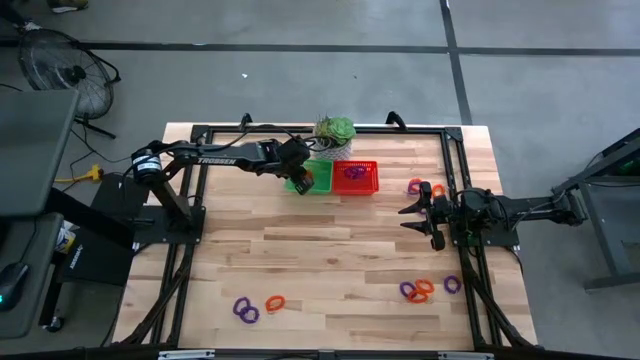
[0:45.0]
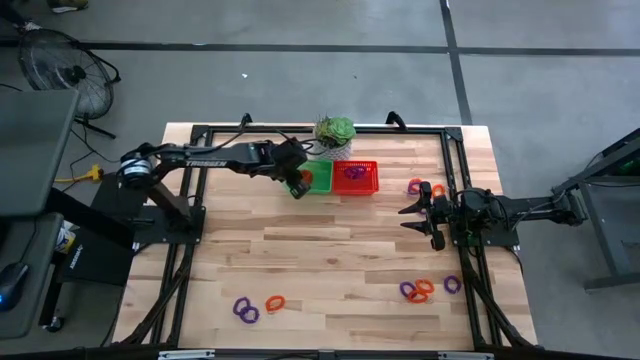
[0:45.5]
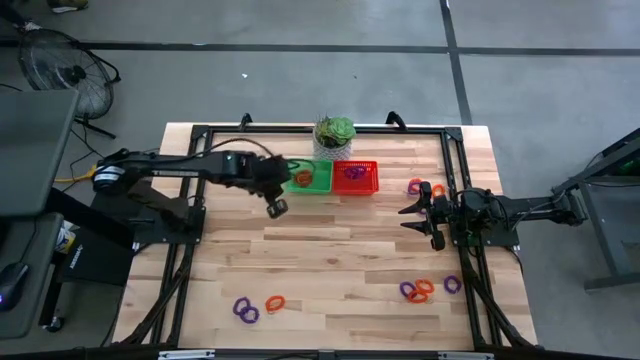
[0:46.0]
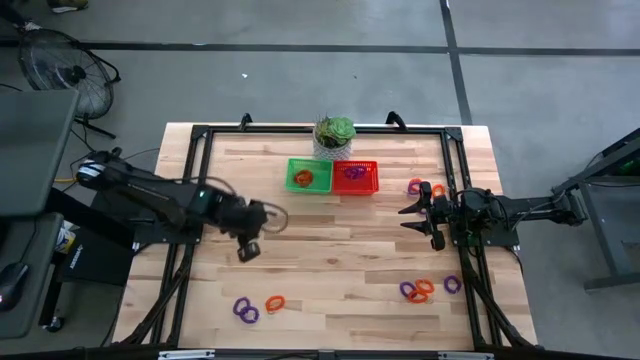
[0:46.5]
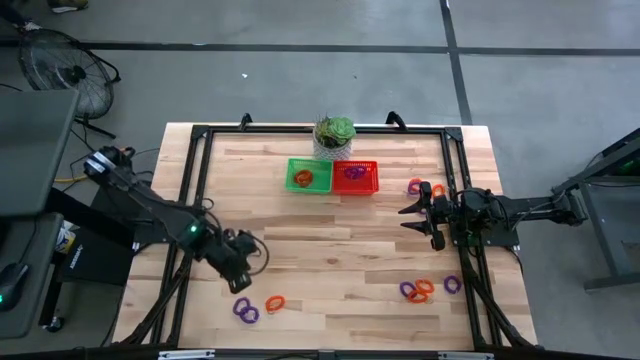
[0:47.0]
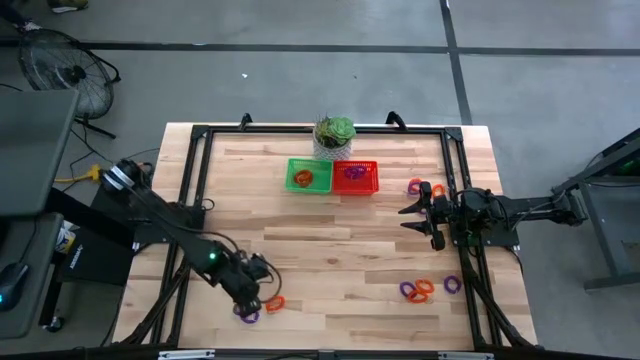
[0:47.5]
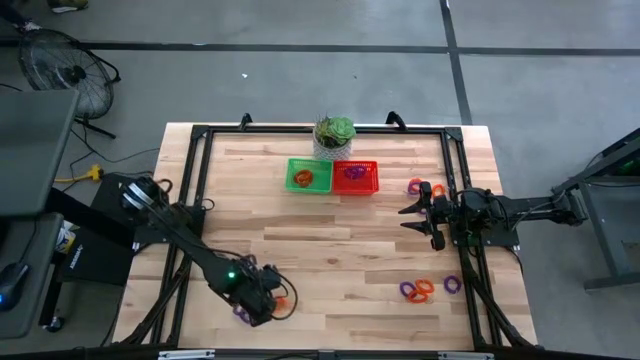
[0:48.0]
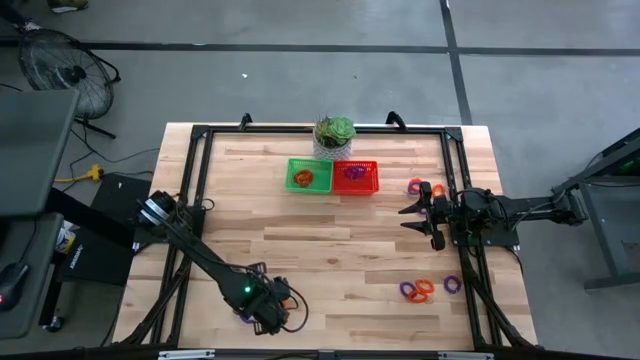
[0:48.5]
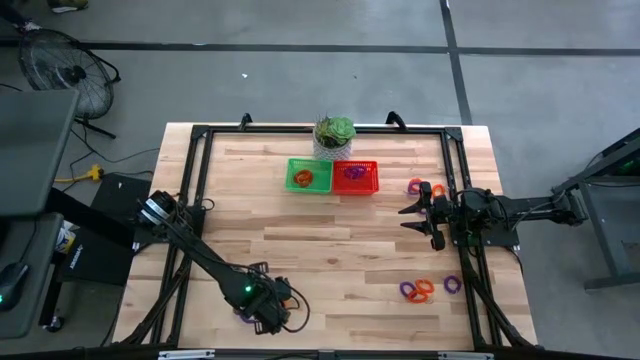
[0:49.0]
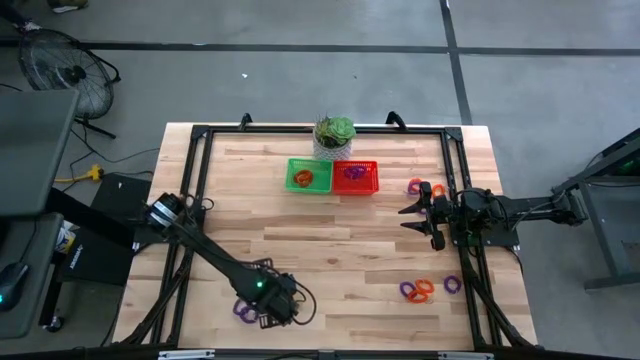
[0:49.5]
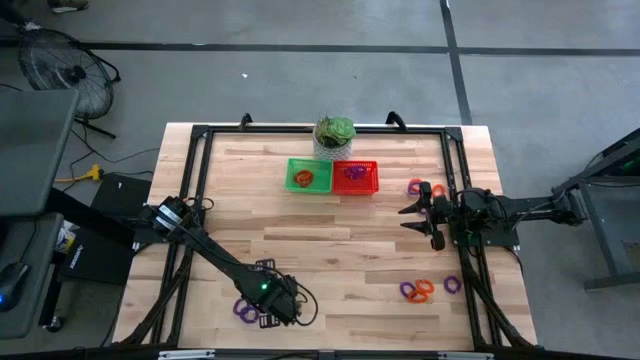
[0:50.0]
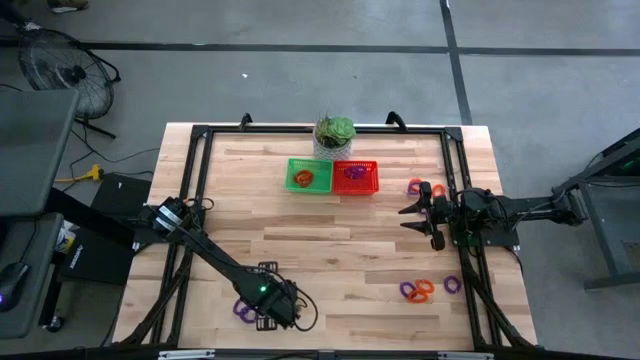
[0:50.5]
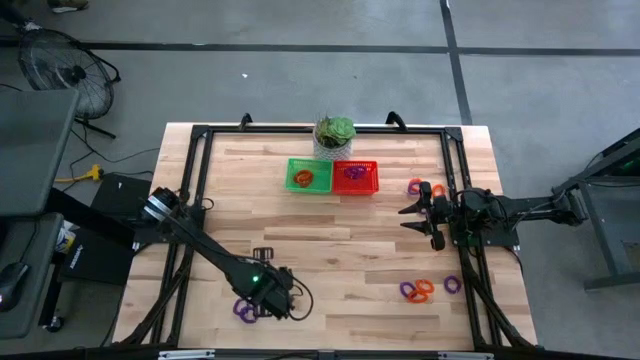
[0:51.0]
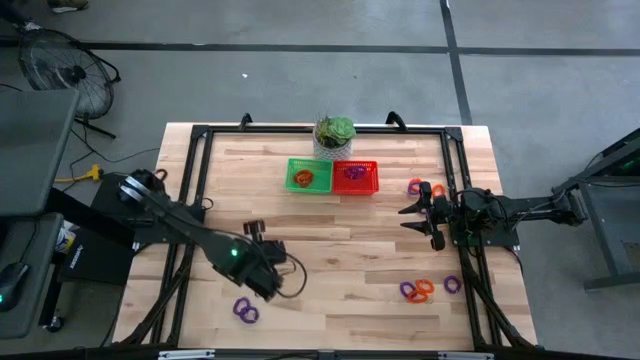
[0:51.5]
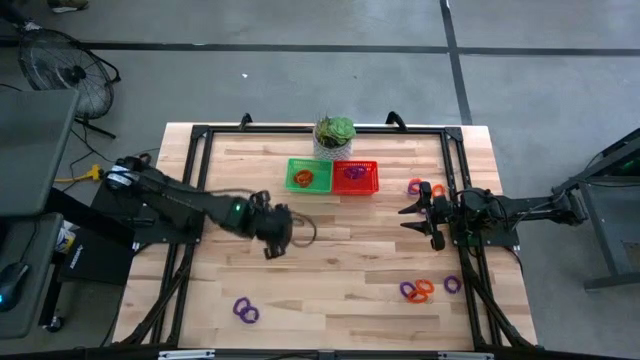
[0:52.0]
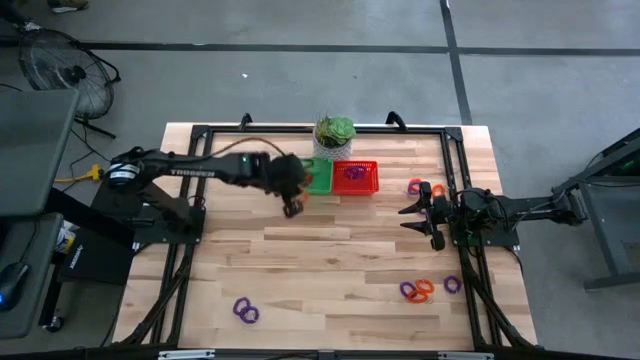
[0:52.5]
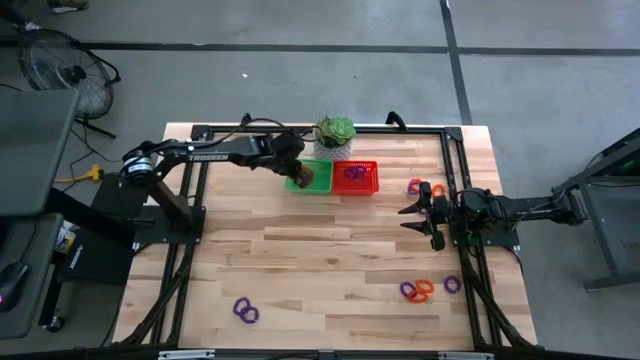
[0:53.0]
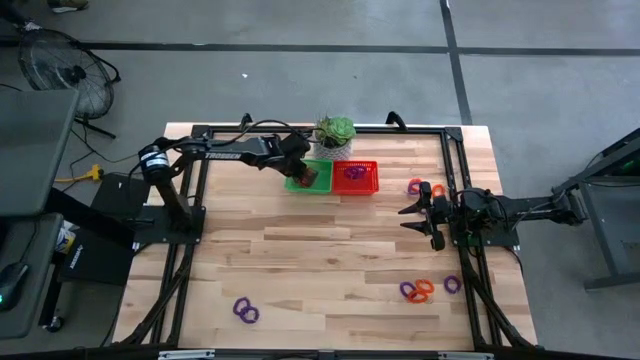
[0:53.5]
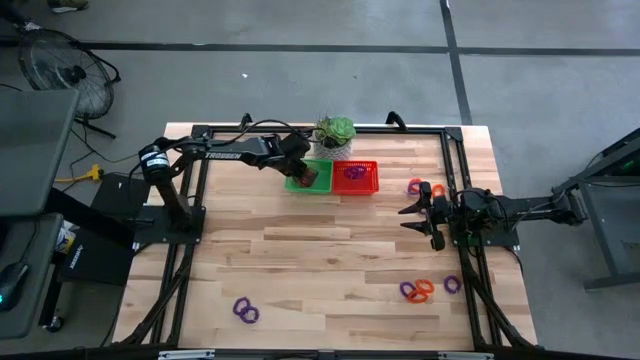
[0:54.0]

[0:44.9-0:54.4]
Task: Sort spring keychains
Put the orange spring keychain into the green bin

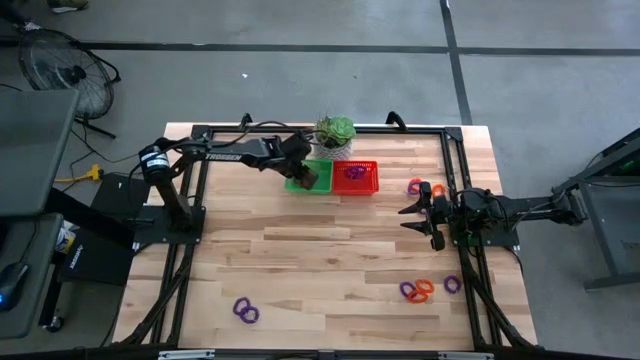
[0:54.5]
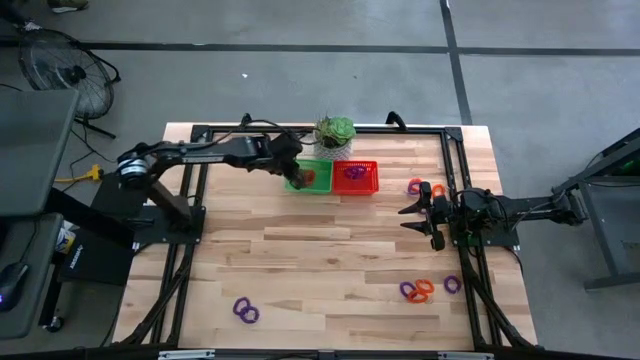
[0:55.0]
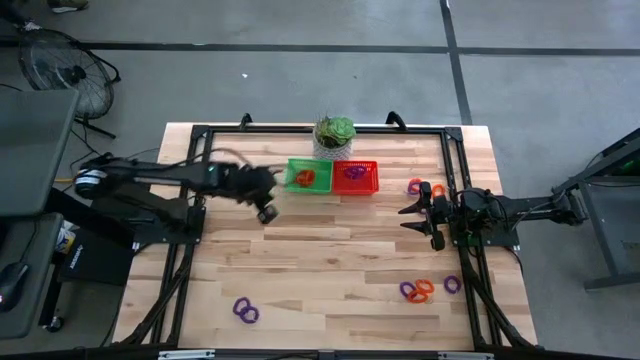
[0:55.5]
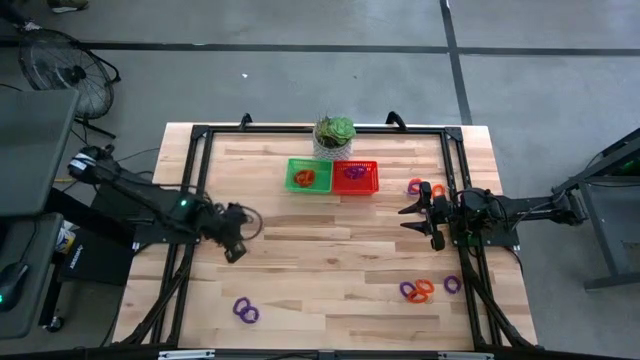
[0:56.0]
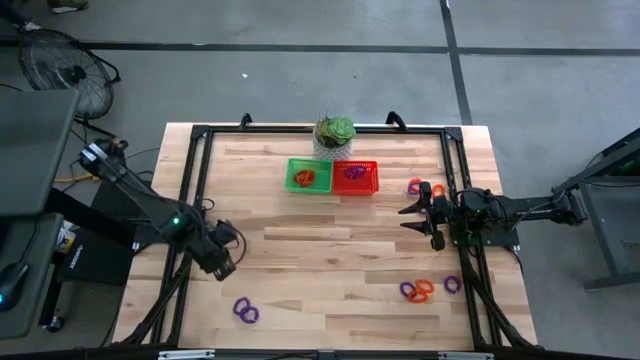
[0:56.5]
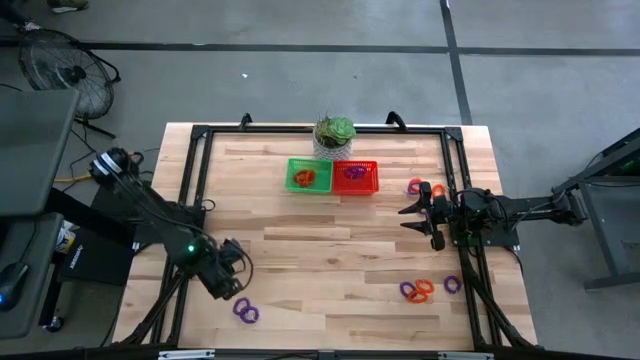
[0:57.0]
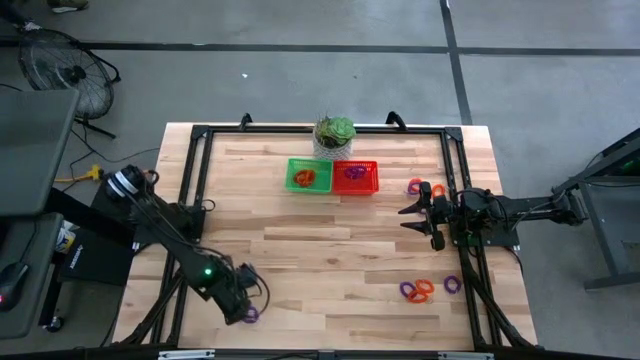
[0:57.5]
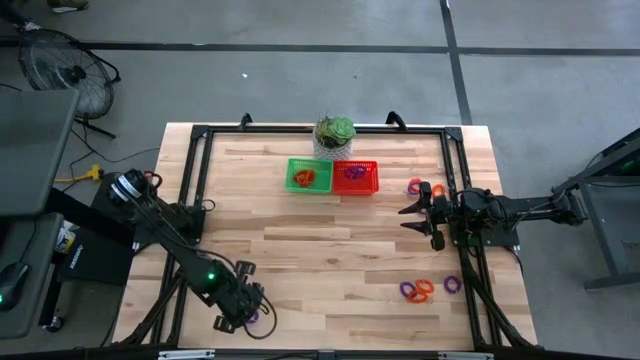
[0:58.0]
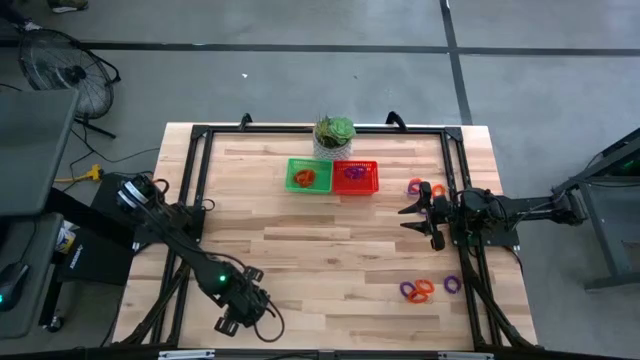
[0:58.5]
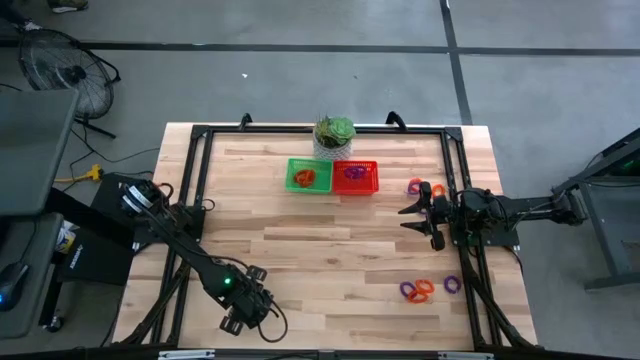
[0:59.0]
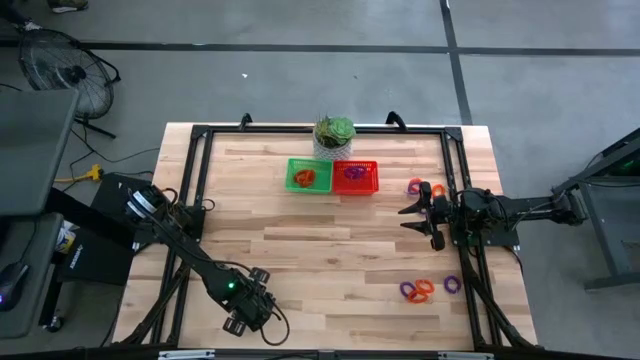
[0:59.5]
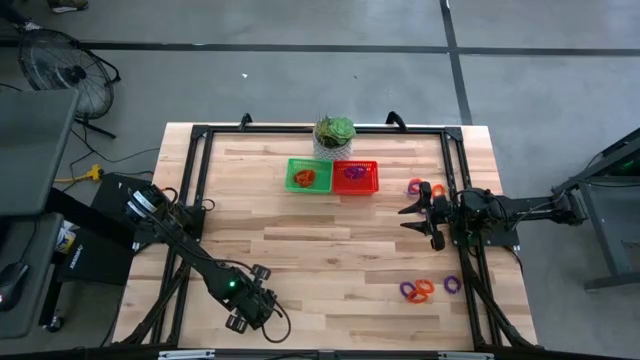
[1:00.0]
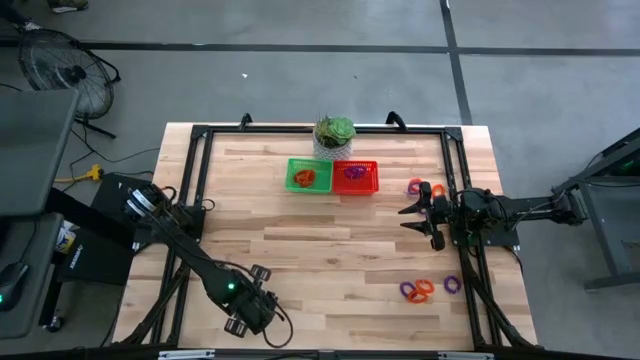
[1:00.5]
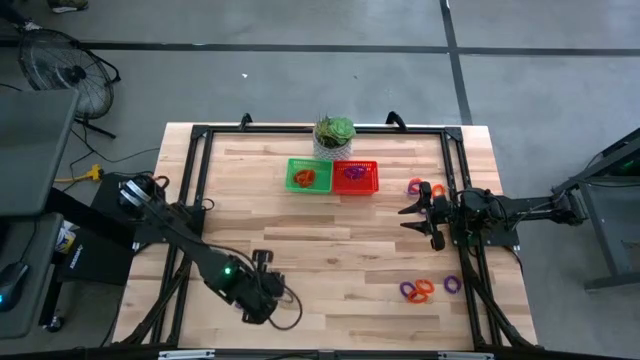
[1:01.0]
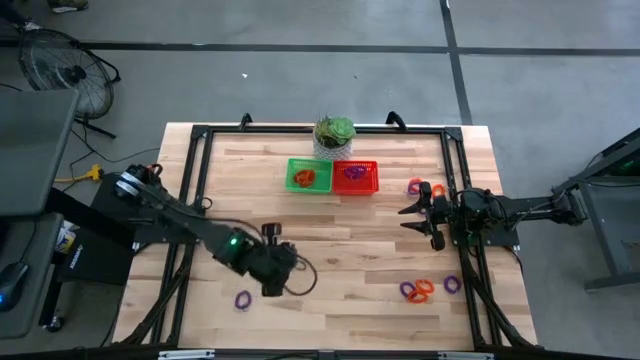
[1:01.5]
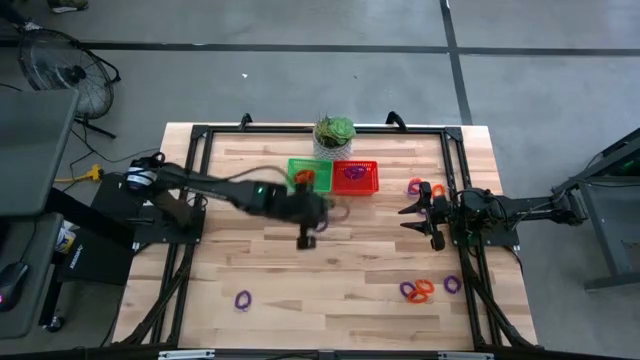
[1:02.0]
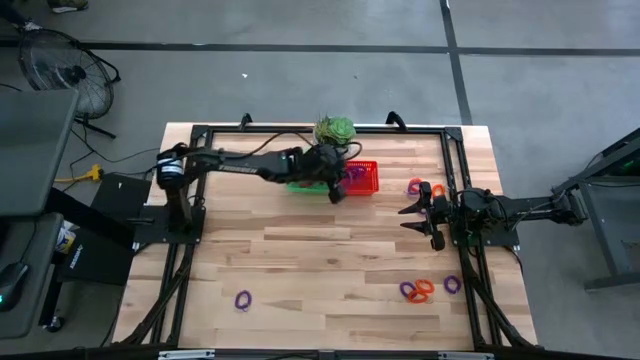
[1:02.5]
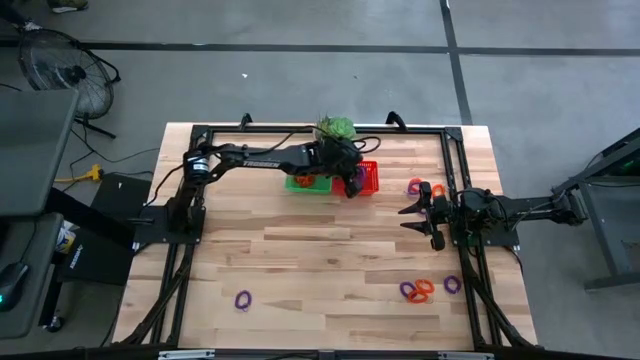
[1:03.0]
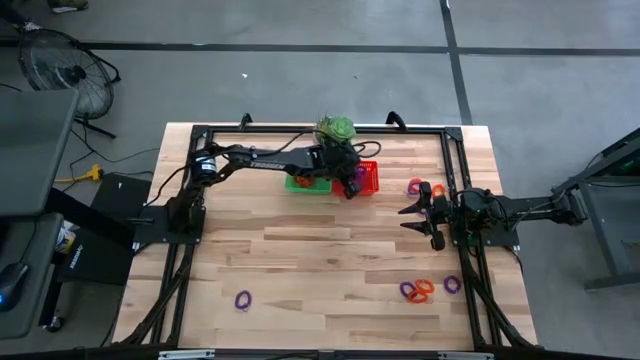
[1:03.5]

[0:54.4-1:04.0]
Put the purple spring keychain into the orange bin

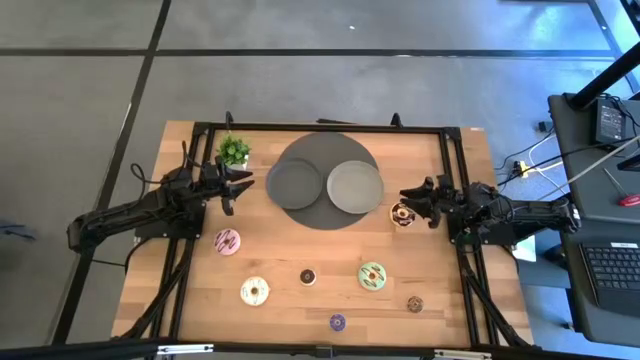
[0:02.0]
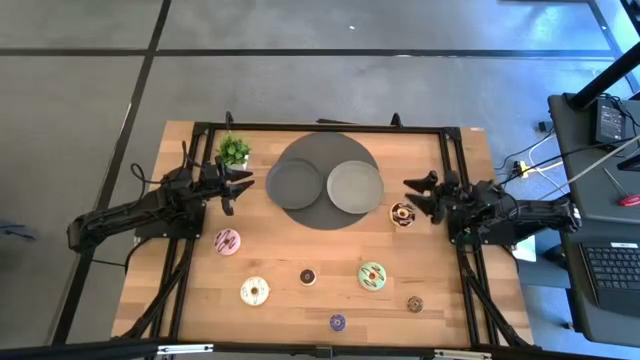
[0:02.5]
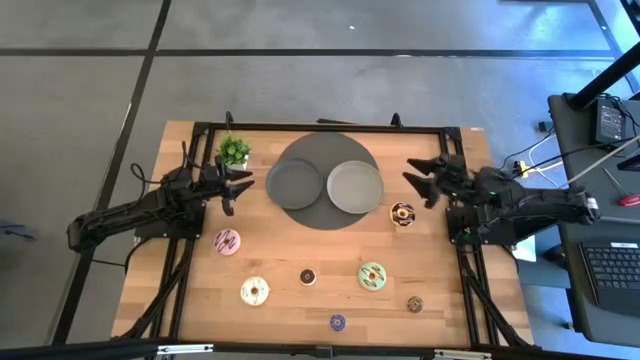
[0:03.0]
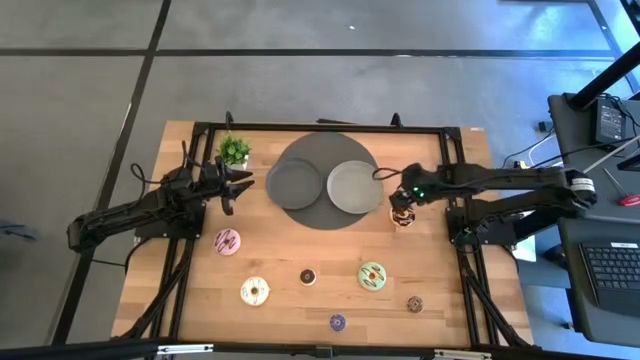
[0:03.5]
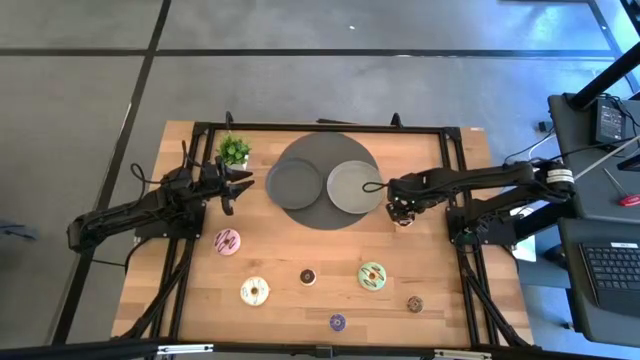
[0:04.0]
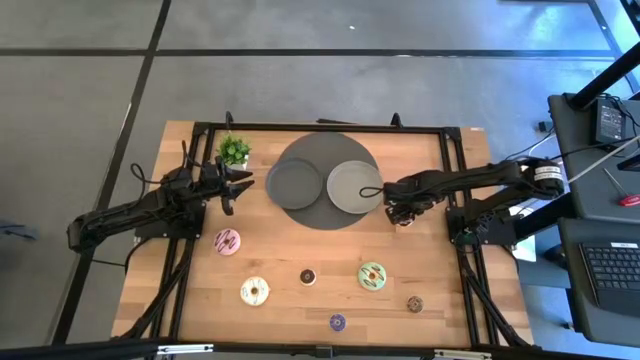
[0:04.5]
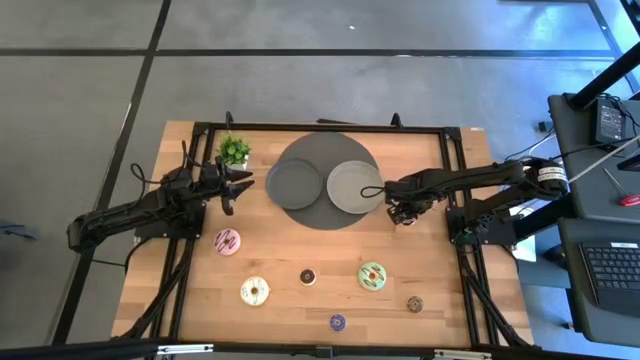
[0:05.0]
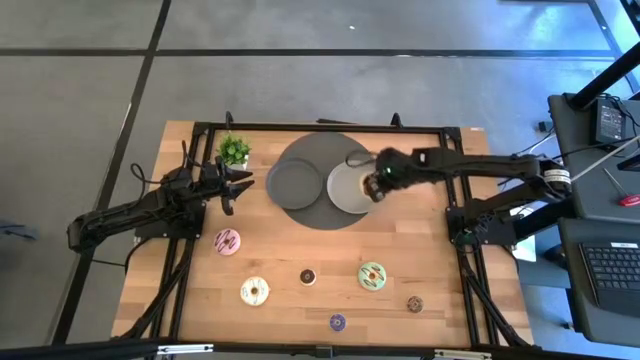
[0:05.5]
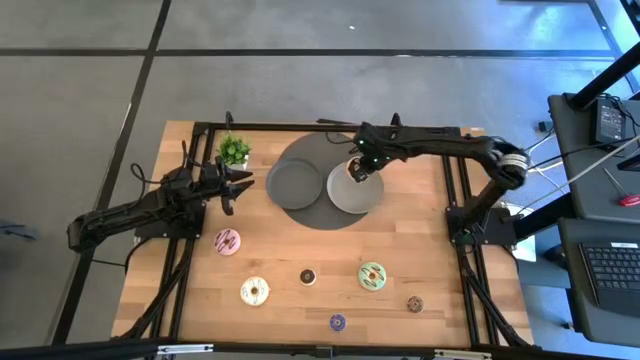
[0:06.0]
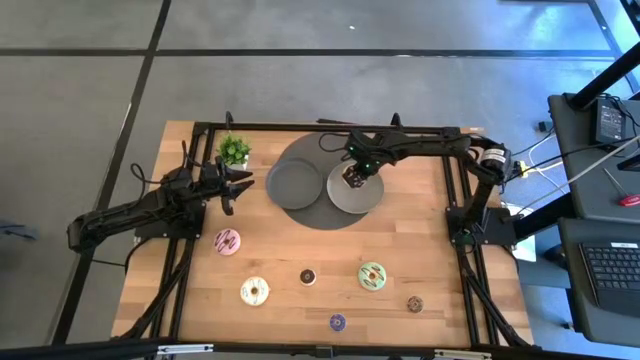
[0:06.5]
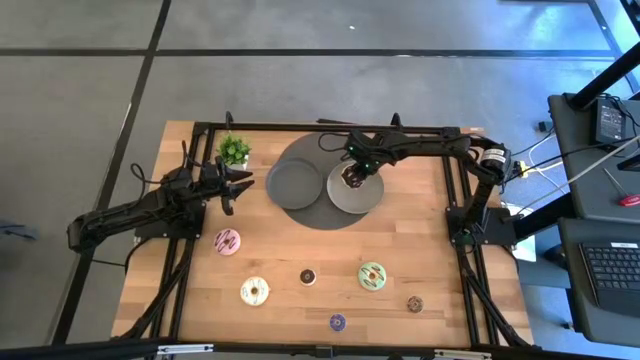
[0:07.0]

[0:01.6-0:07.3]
Task: Pick & Place donuts
Put the large black donut on the gray plate
